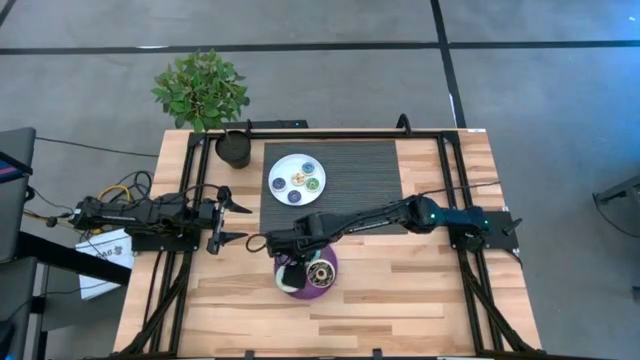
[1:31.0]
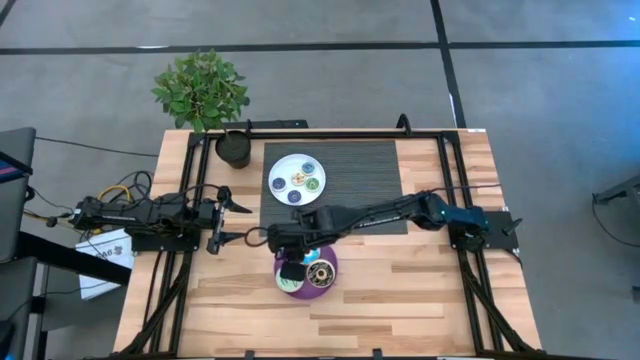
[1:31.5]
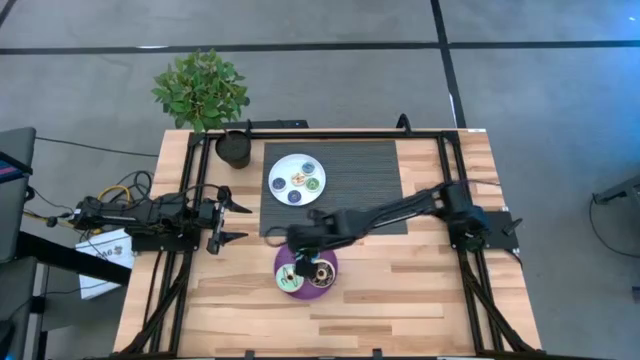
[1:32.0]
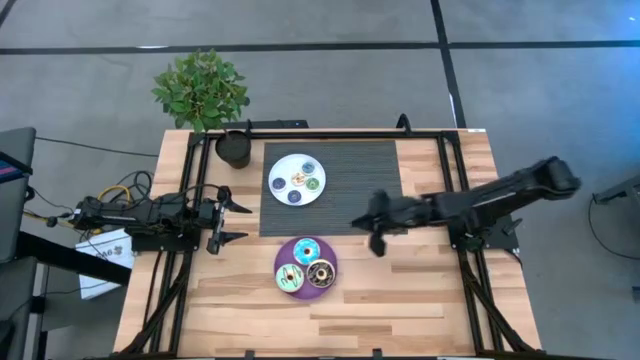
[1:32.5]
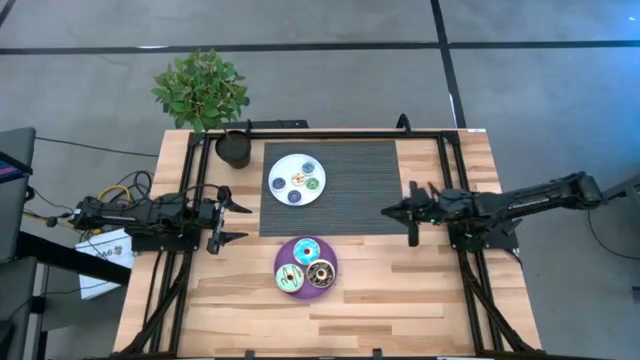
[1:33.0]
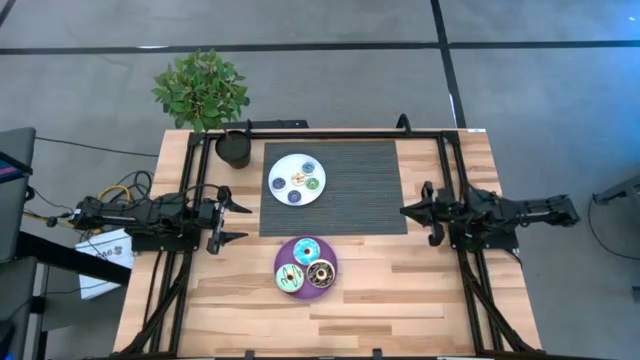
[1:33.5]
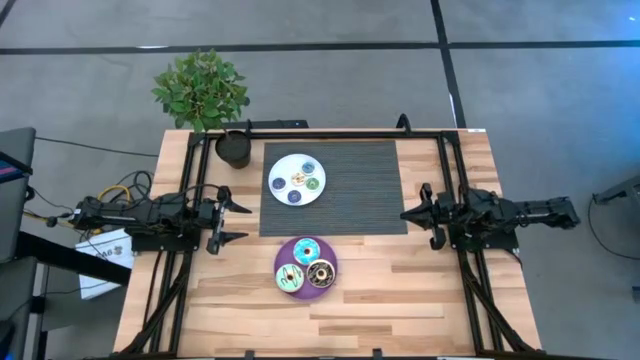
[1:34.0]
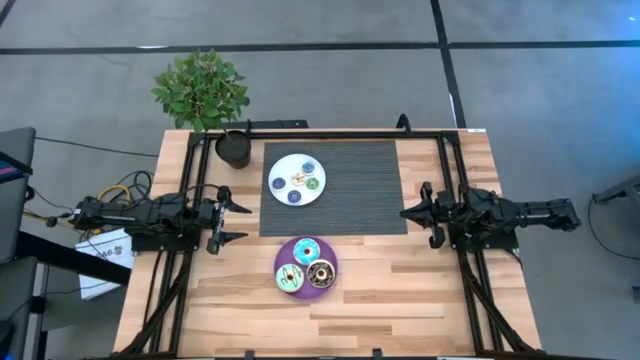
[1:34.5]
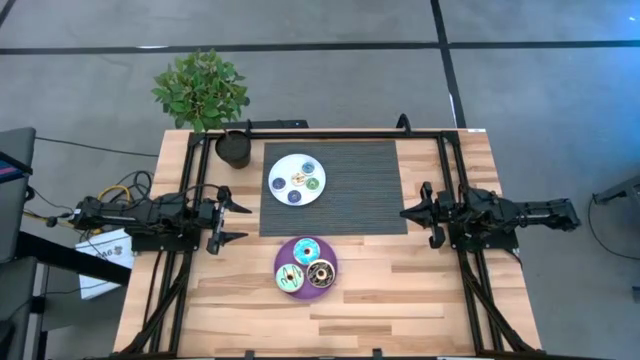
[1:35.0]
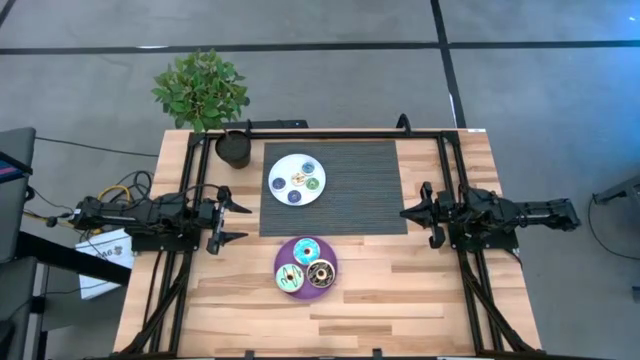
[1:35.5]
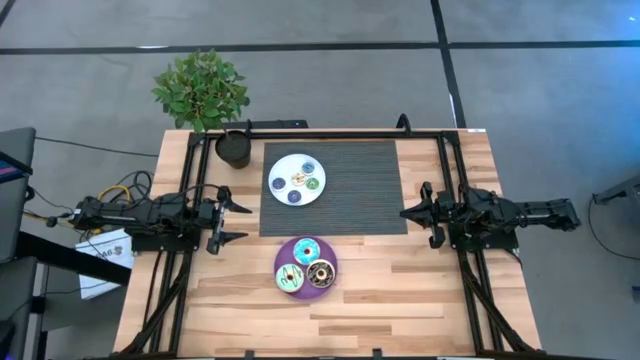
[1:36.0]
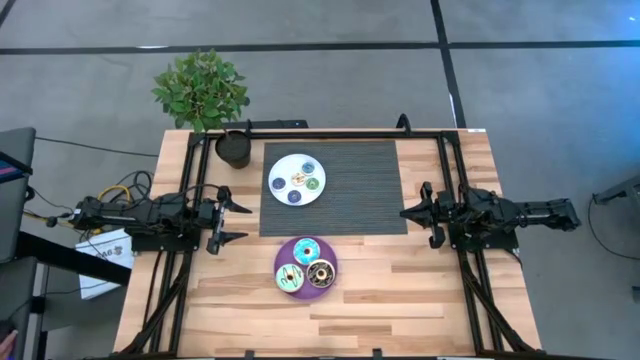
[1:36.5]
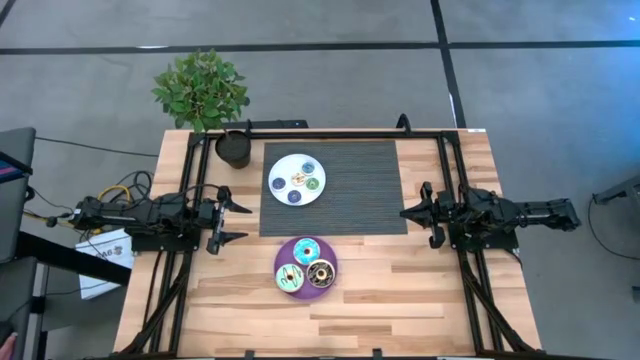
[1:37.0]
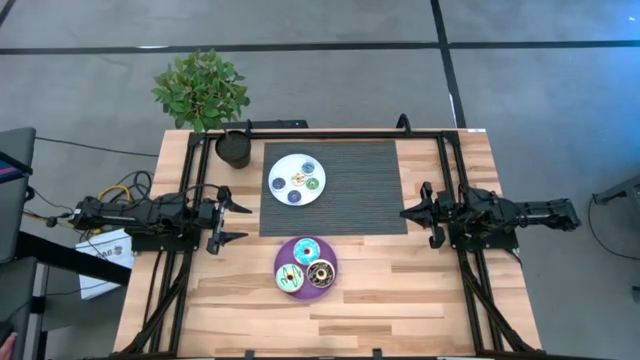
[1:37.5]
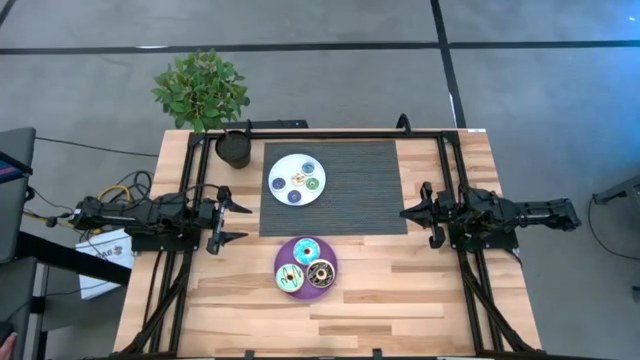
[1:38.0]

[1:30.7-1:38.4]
Task: Pick & Place donuts
Return to Home Position

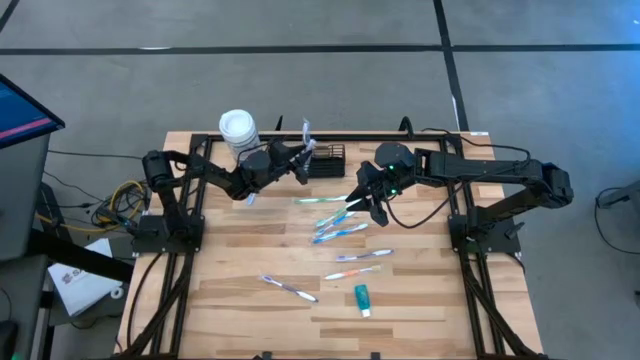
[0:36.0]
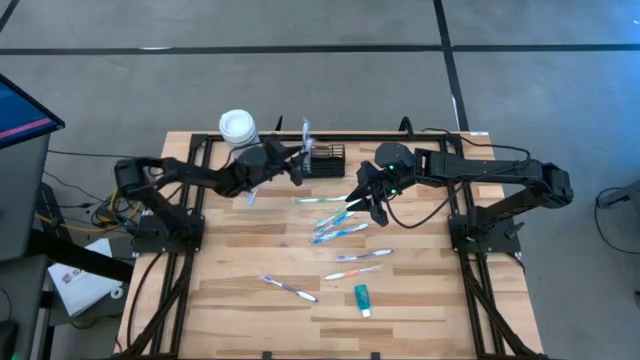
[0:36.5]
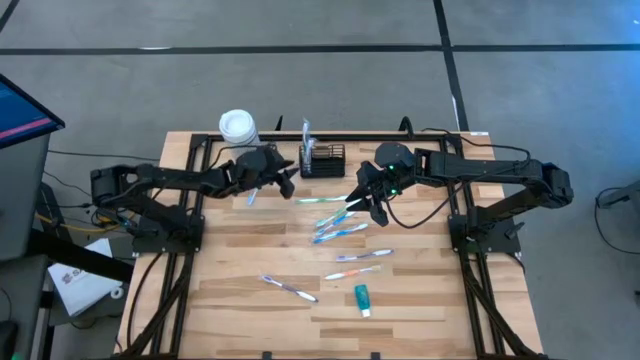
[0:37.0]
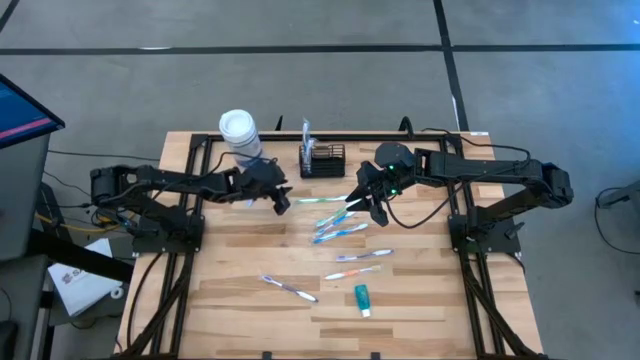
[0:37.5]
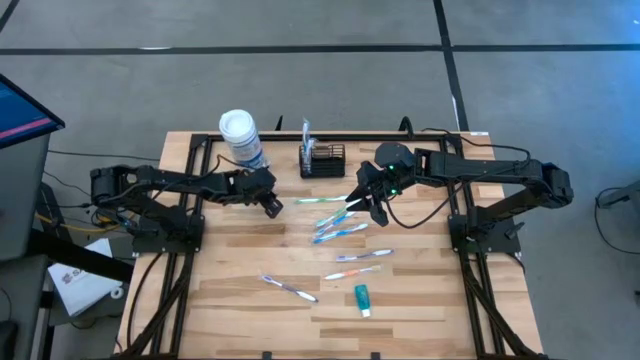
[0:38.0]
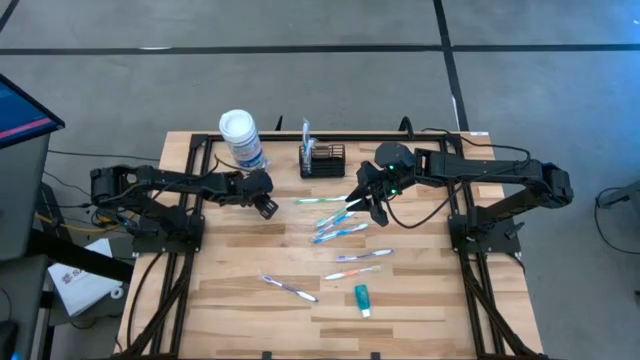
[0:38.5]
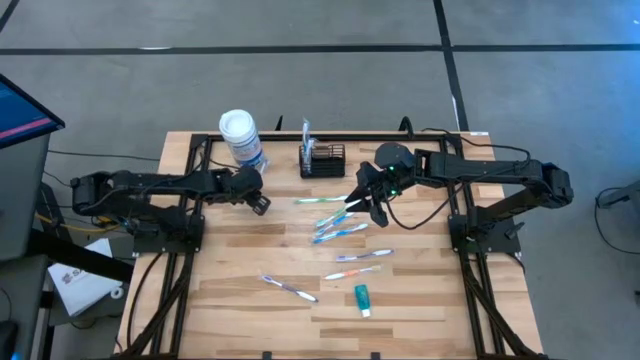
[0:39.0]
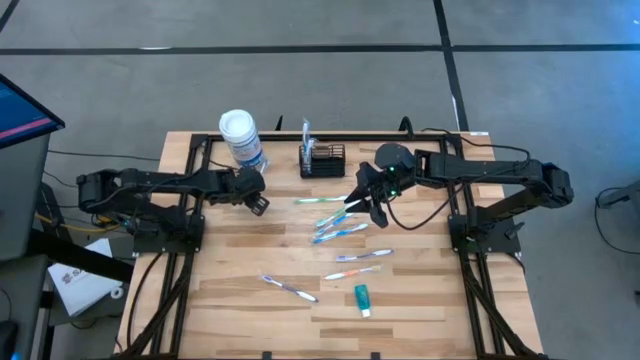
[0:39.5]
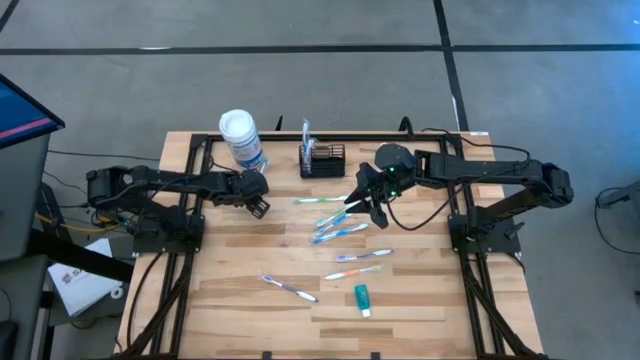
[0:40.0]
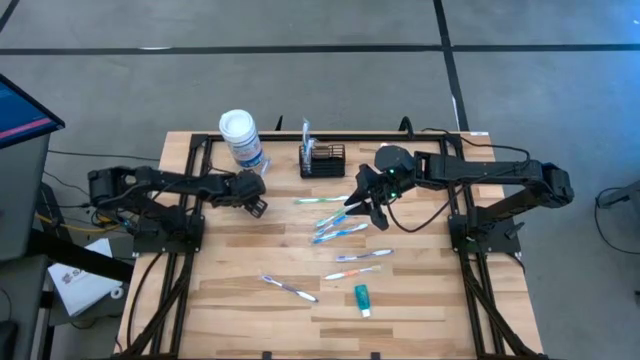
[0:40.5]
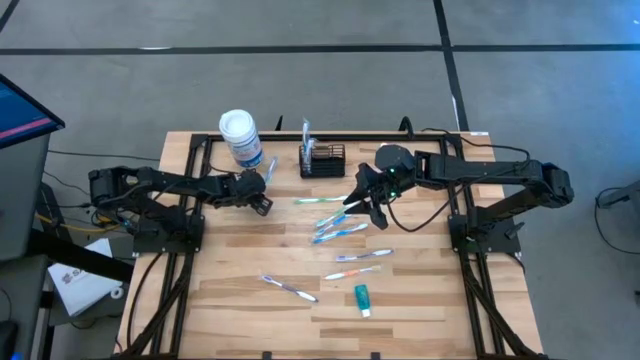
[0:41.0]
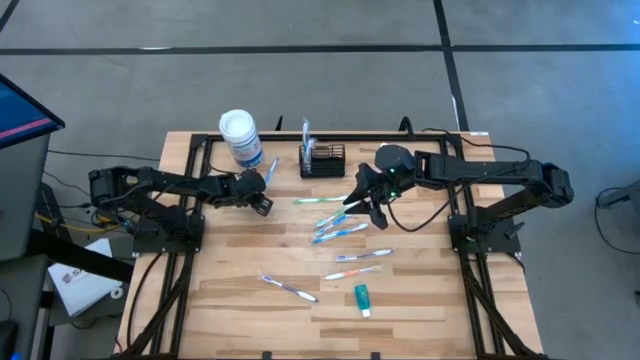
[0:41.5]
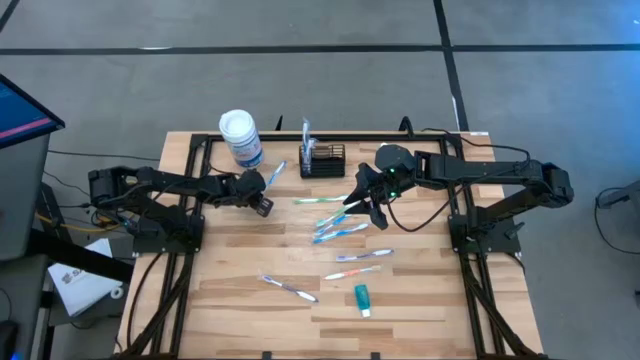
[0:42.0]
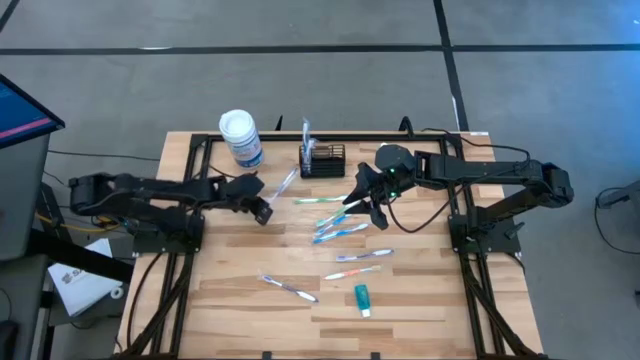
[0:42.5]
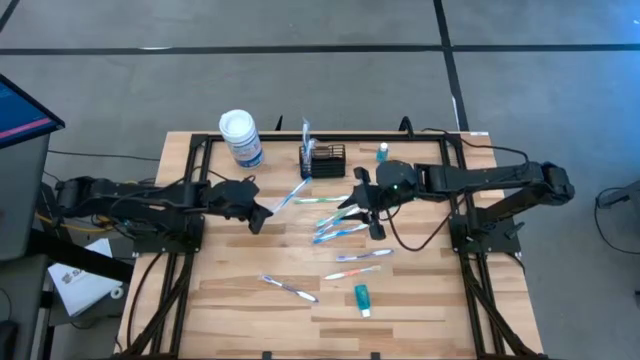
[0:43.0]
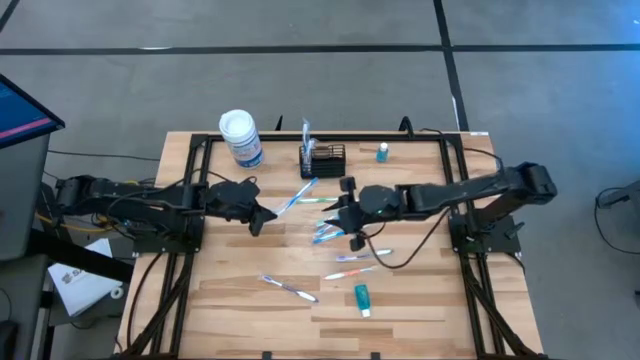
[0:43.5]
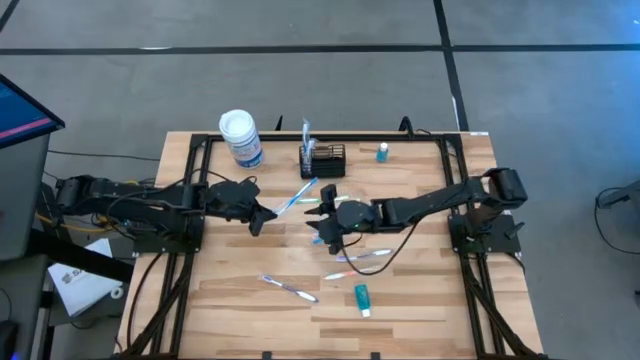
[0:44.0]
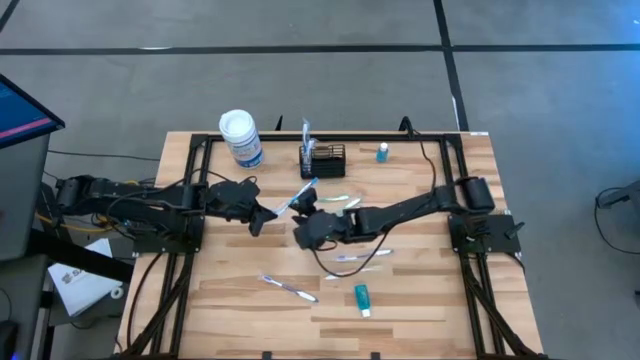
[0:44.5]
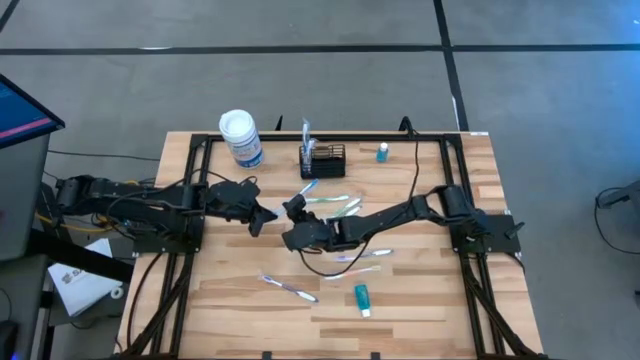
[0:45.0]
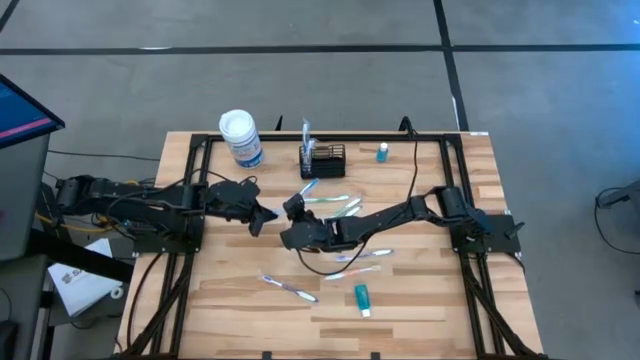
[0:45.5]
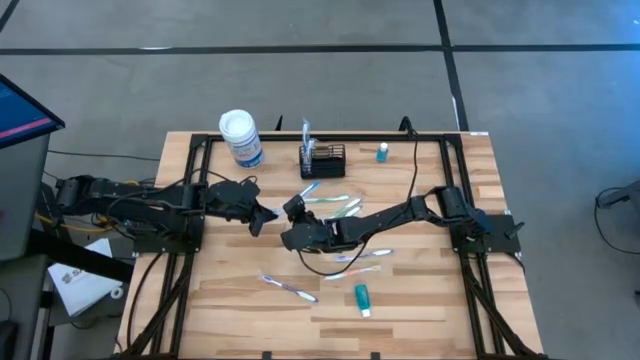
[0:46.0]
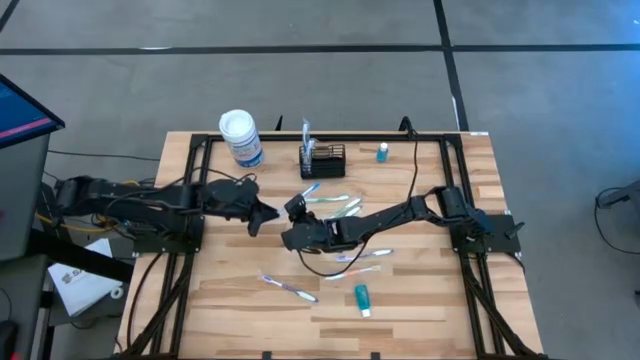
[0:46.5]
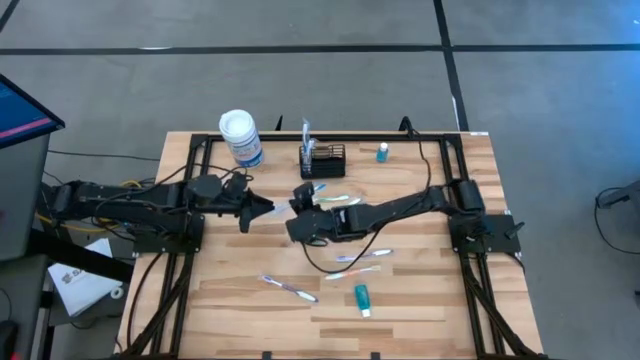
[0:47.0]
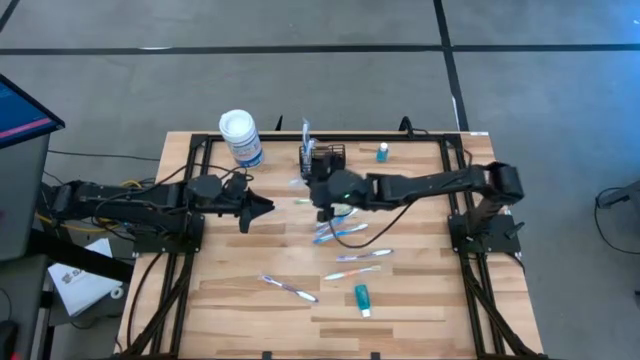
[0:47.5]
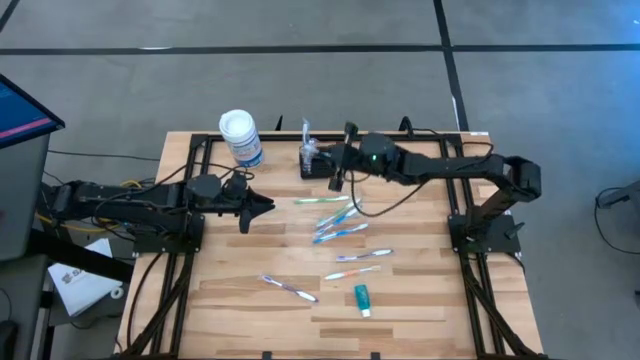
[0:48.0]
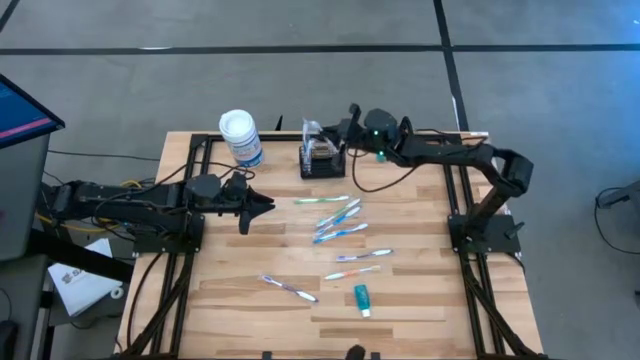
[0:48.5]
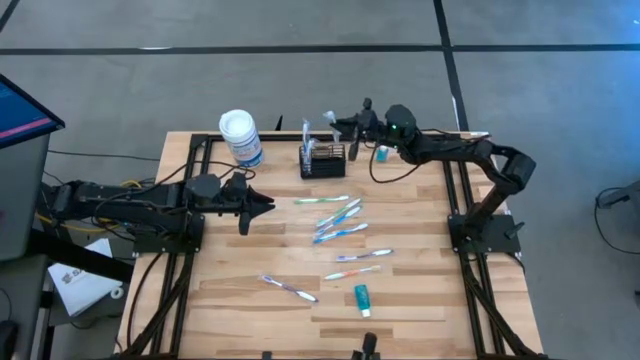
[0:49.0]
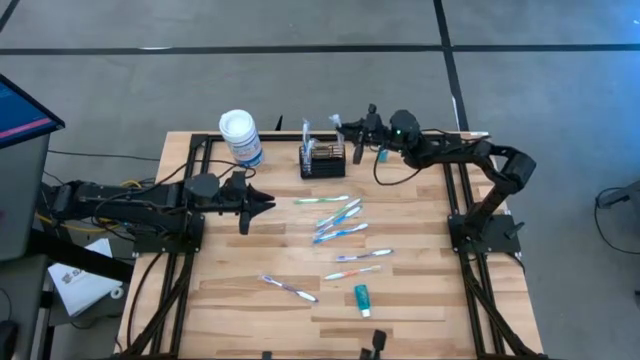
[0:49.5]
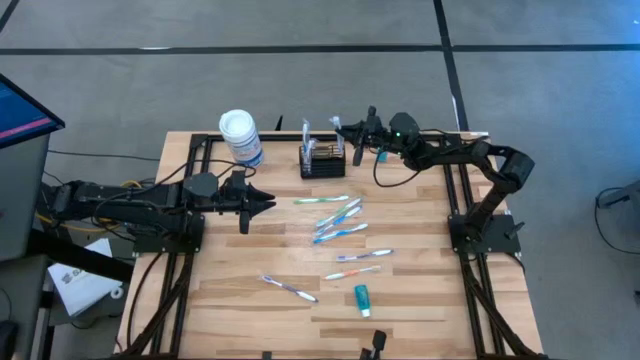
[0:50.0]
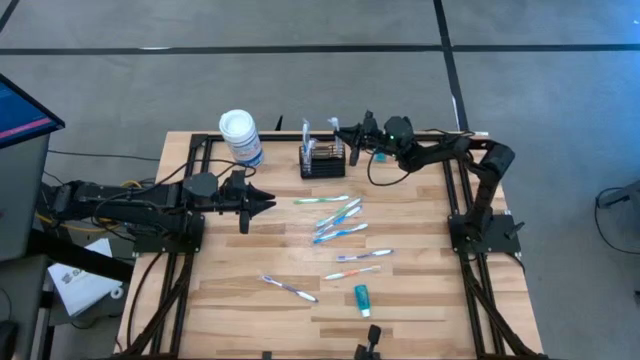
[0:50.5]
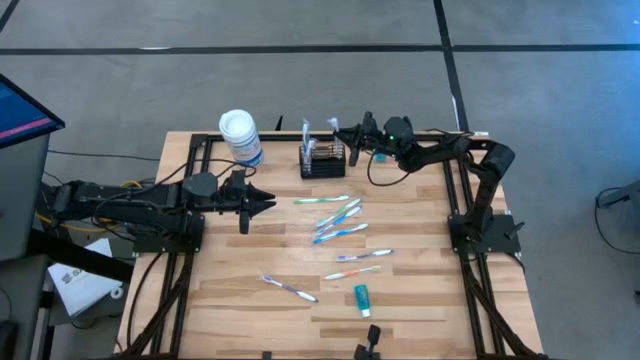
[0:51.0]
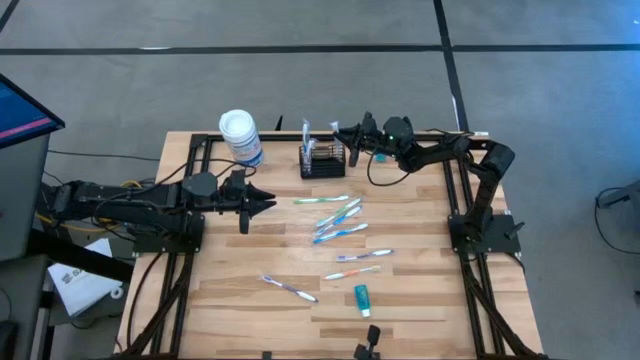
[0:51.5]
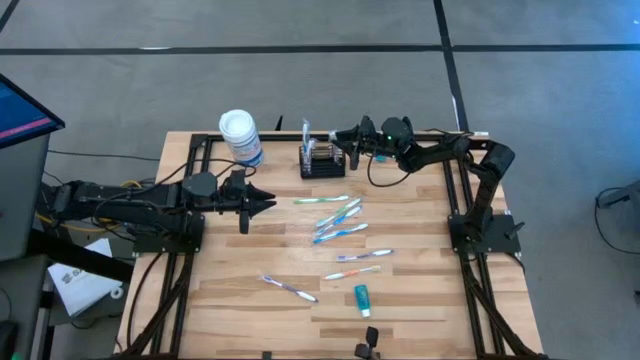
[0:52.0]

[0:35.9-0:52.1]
Task: Pick & Place toothbrushing station
Put the top left blue toothbrush into the black wire organizer
